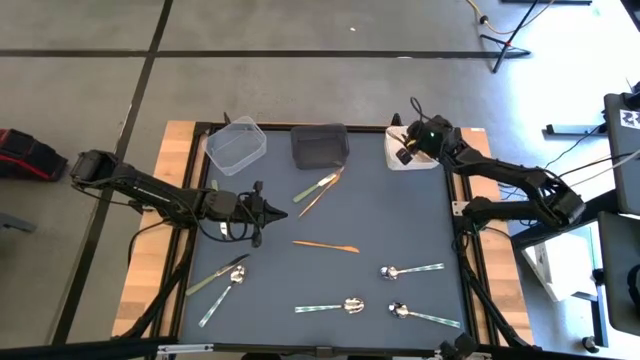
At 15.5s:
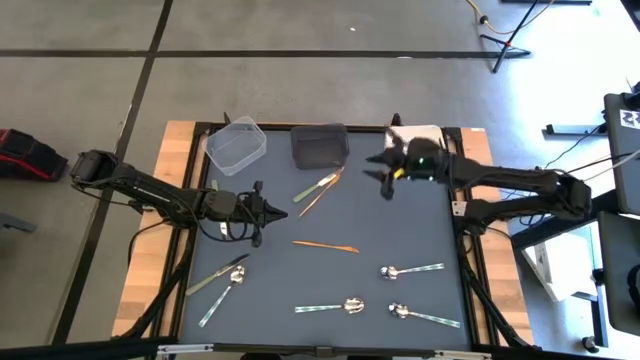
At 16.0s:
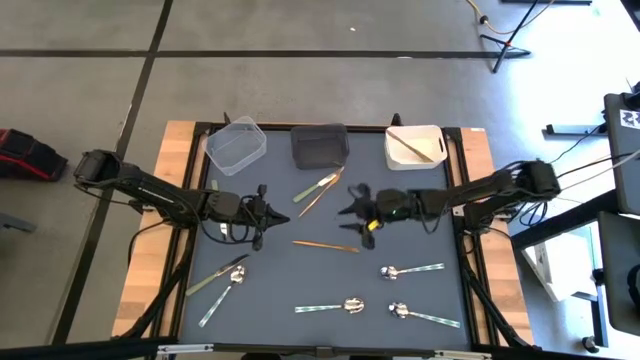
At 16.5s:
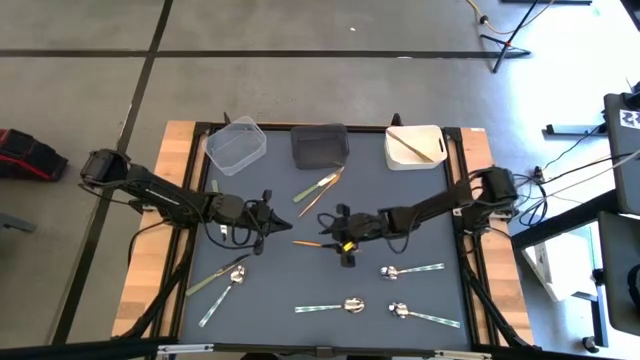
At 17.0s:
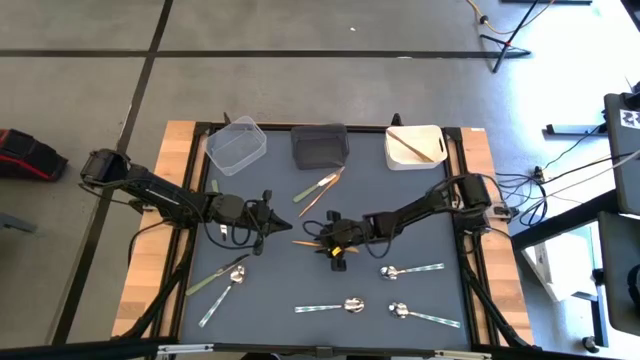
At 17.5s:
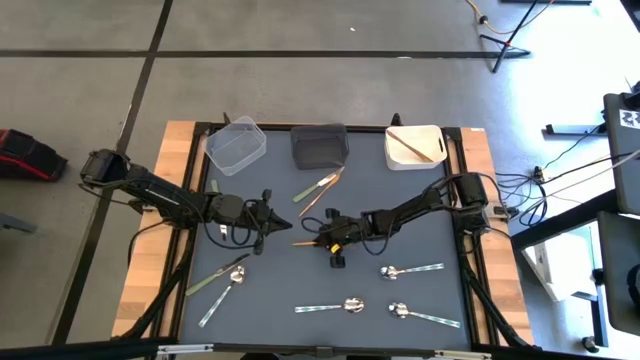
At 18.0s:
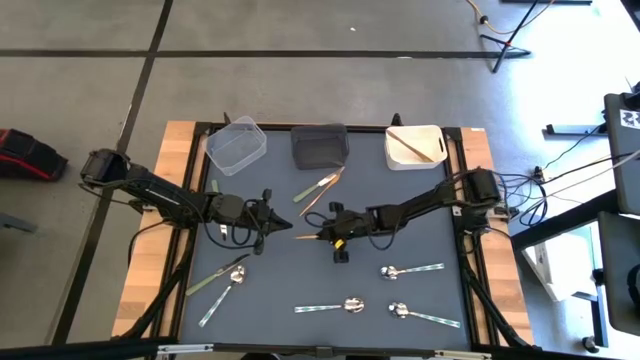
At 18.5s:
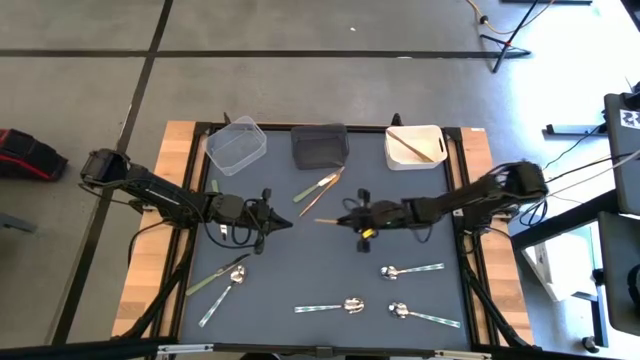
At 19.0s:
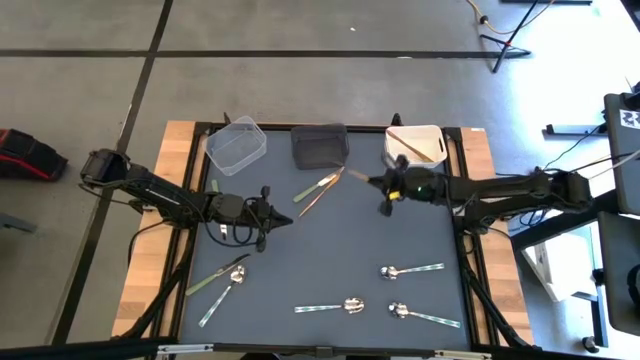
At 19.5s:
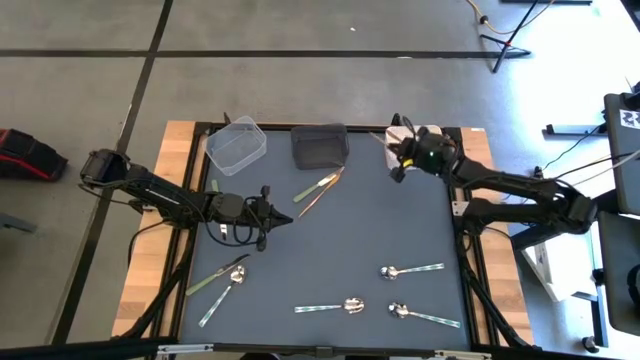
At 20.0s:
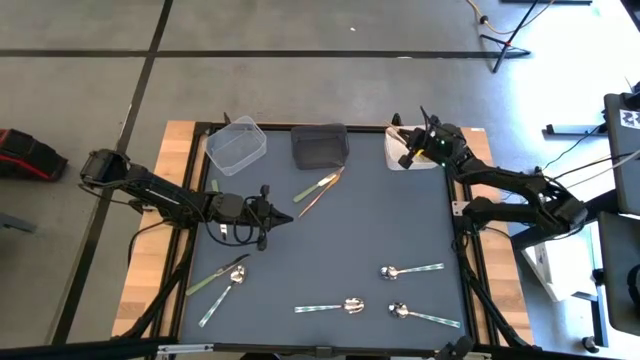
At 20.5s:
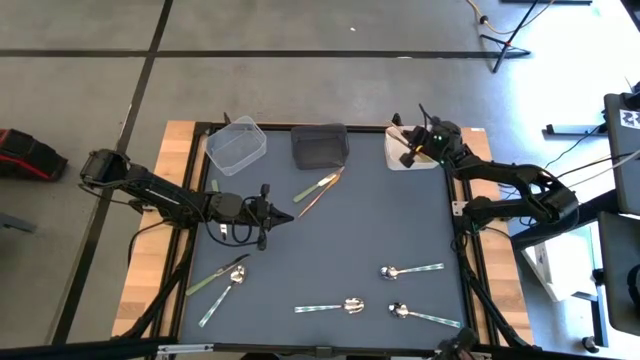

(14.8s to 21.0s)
Task: Sort silverware by color (type)
Put the bottom gold table knife into the white bin

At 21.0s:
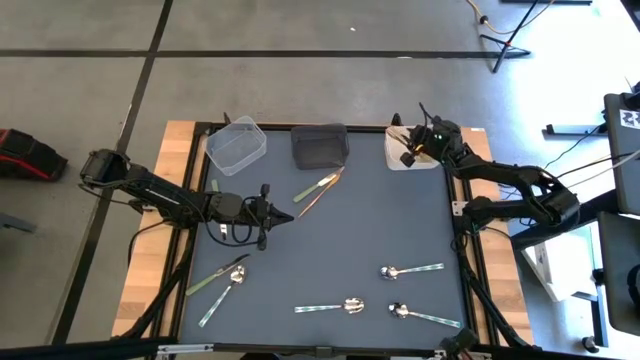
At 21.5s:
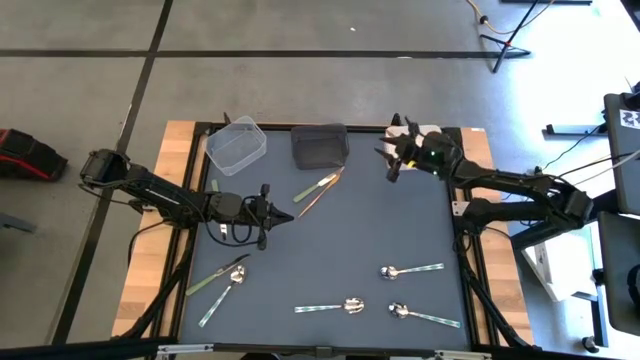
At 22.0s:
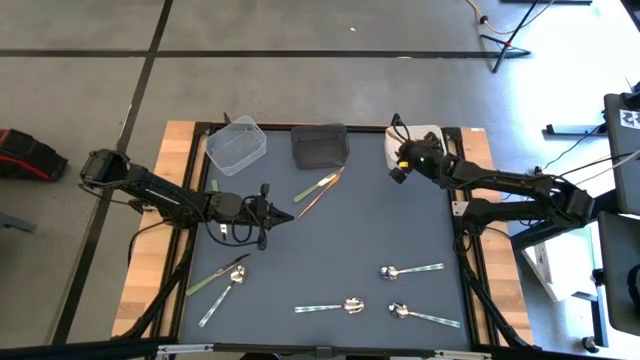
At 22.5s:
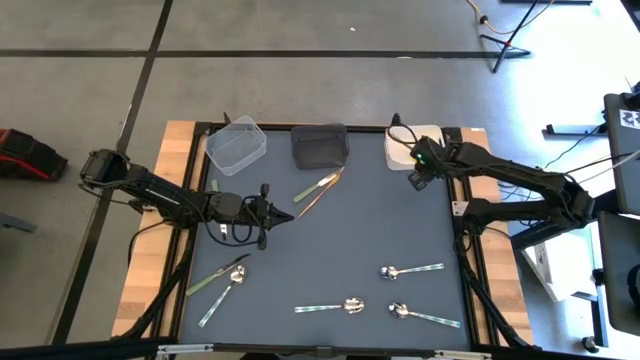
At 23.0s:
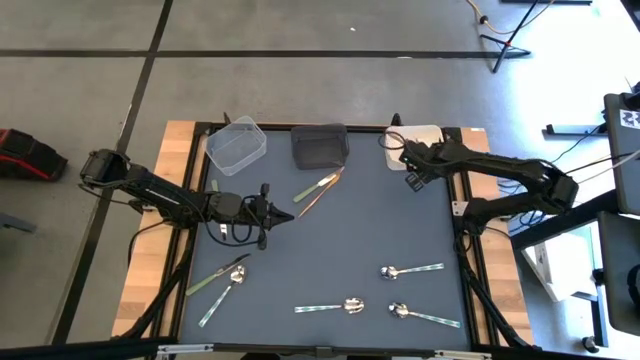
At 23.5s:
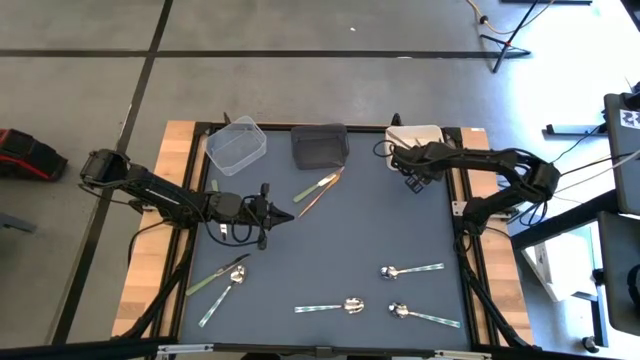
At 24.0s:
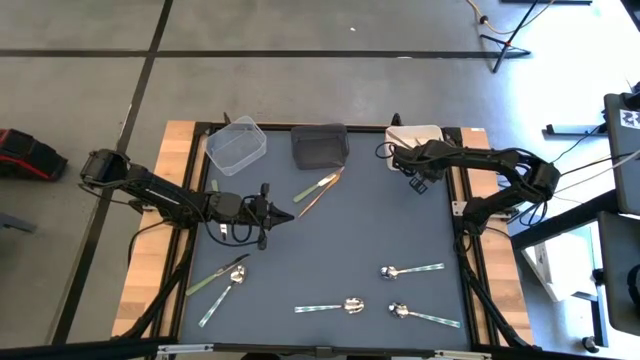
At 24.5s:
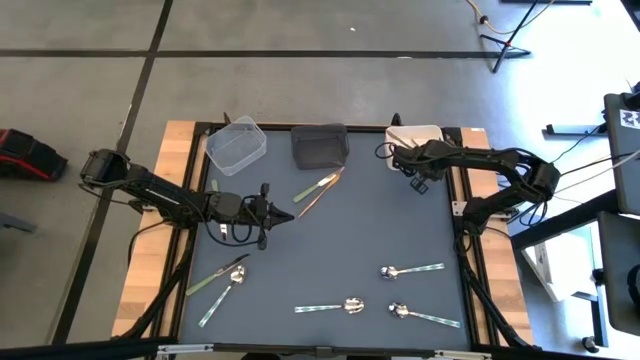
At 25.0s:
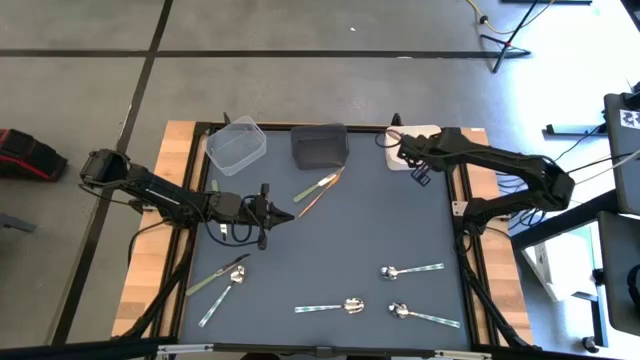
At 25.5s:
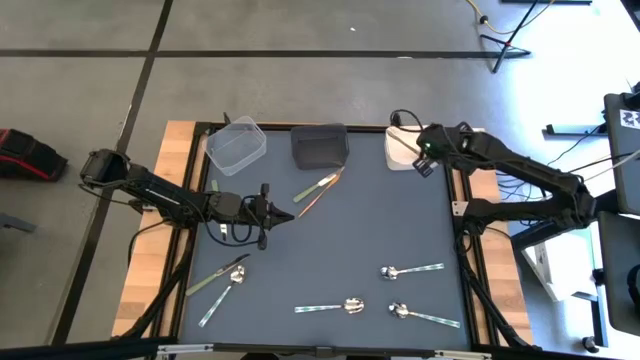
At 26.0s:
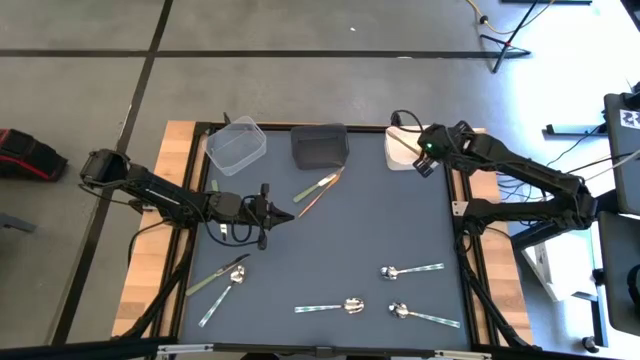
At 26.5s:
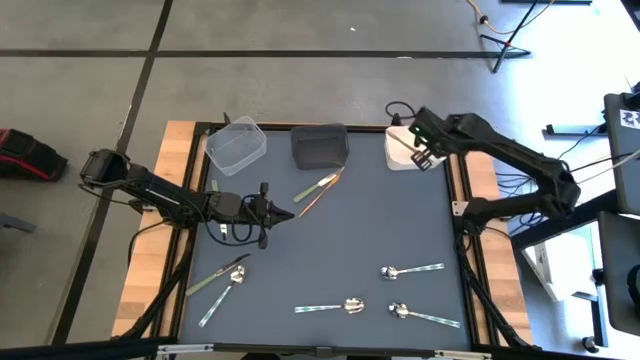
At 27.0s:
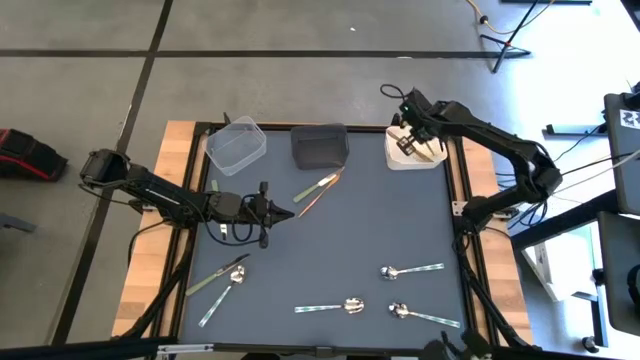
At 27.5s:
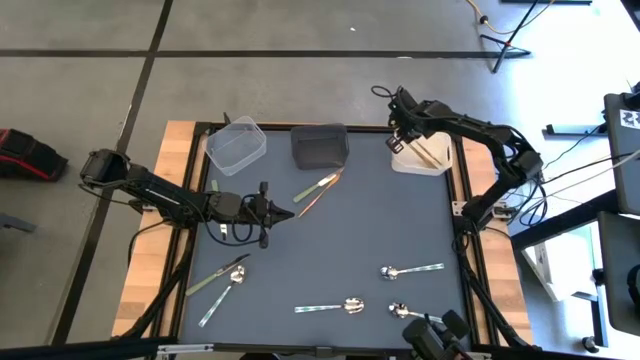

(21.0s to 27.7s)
Put the bottom gold table knife into the white bin

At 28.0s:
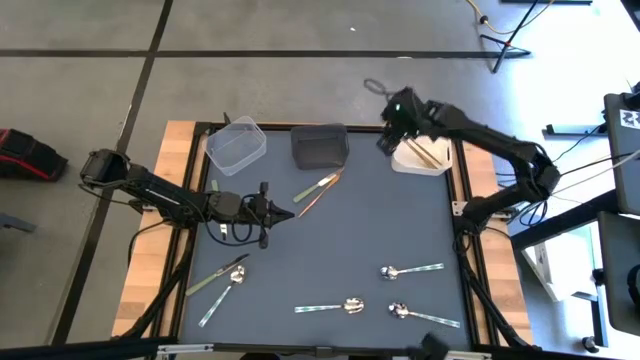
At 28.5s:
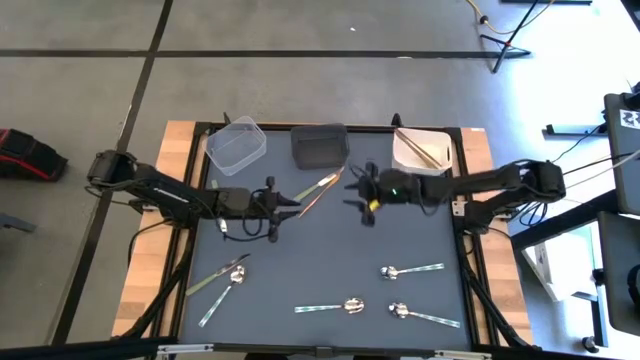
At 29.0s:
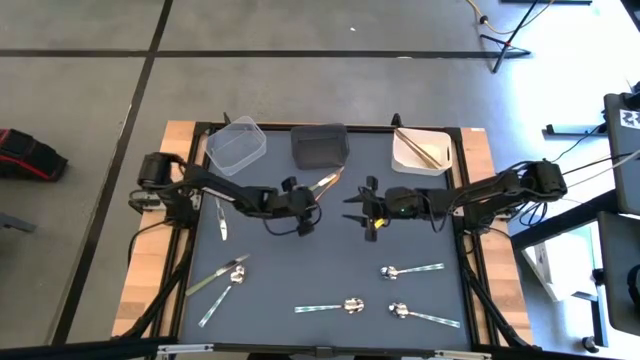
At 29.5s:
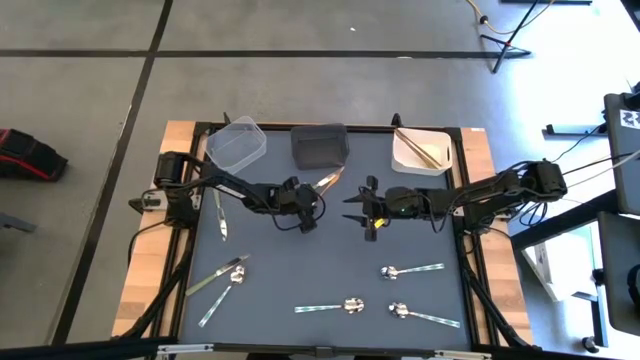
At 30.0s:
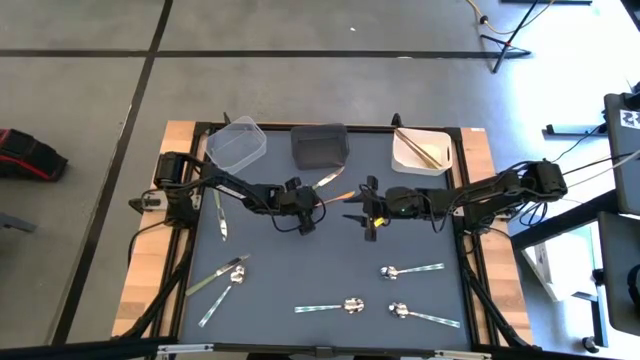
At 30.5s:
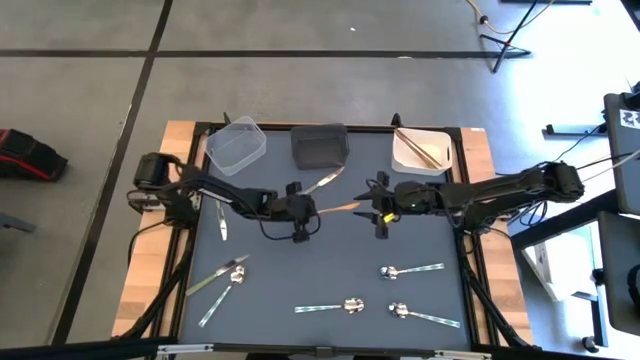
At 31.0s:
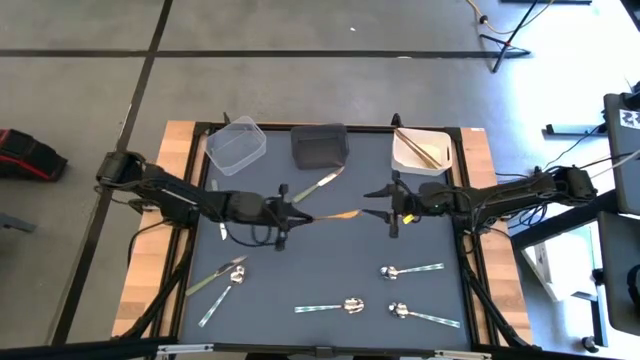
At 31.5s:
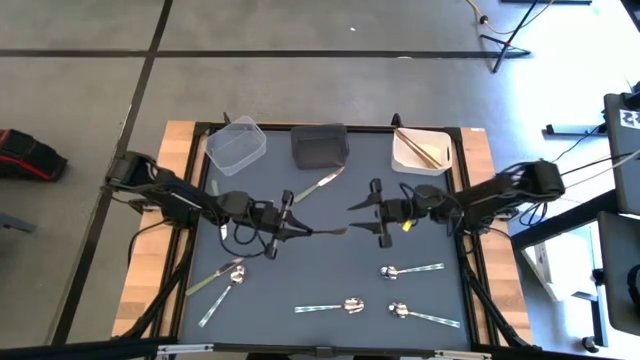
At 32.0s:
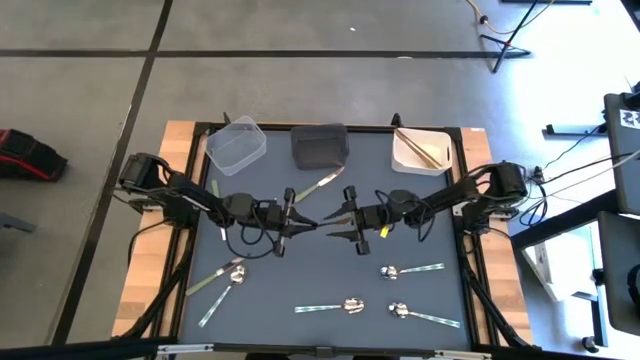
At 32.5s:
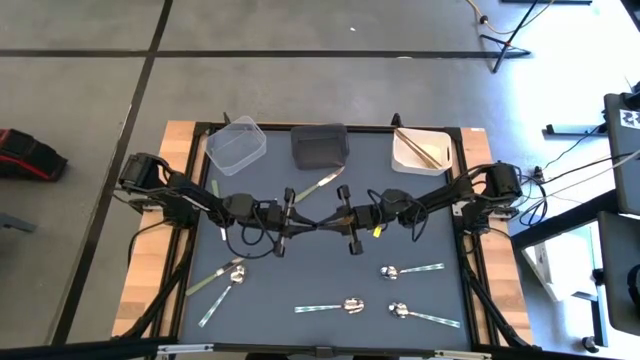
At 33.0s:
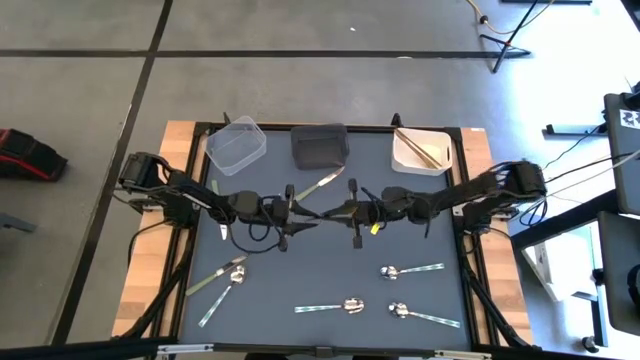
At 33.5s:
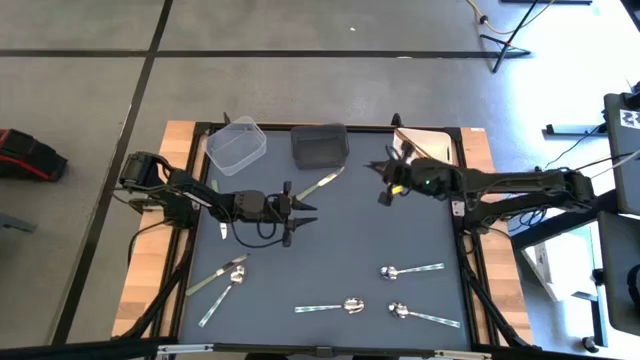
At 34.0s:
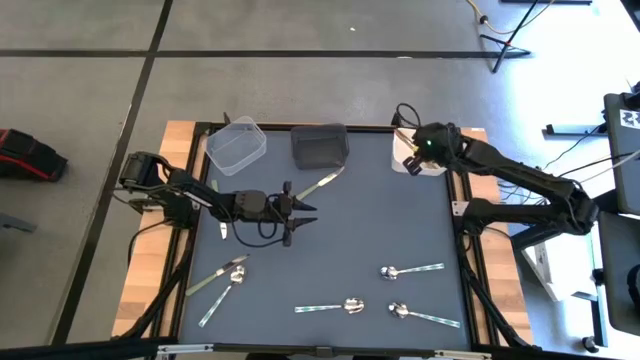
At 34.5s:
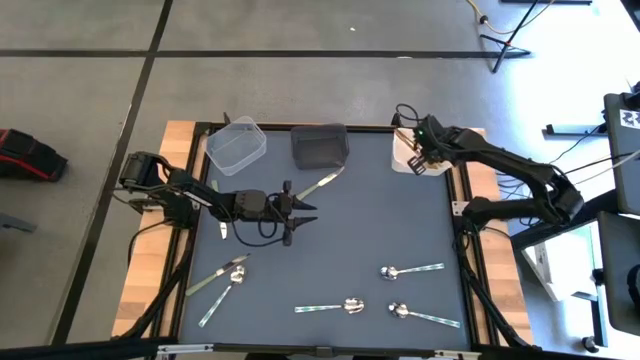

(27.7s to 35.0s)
Put the gold table knife into the white bin

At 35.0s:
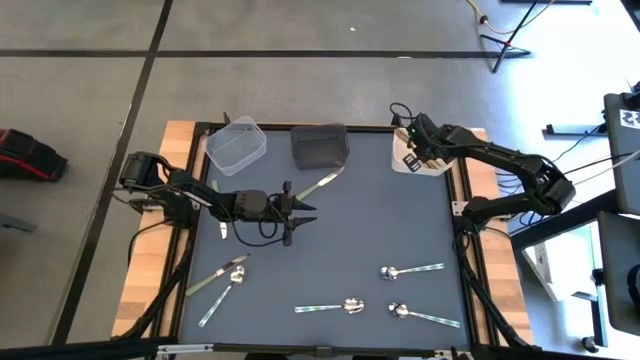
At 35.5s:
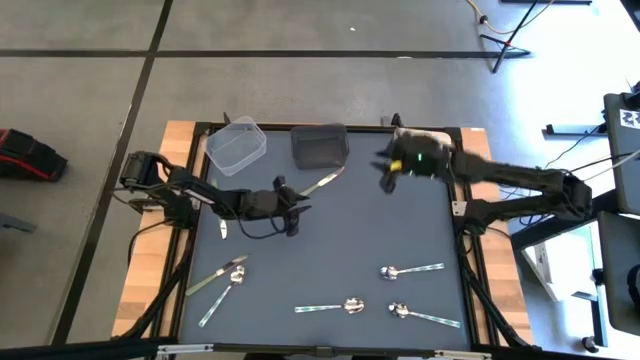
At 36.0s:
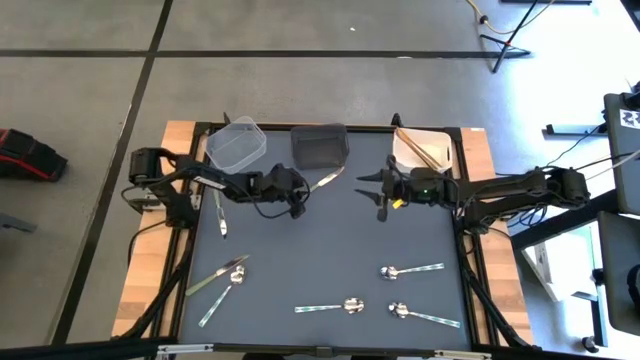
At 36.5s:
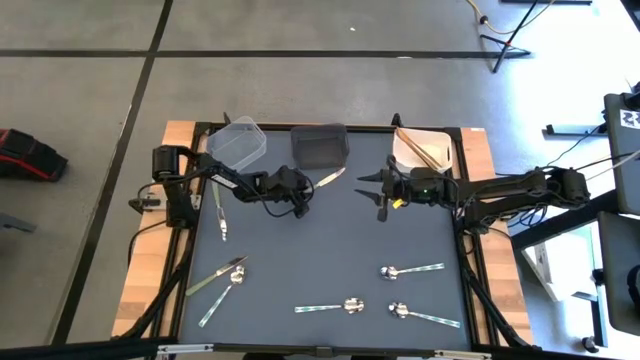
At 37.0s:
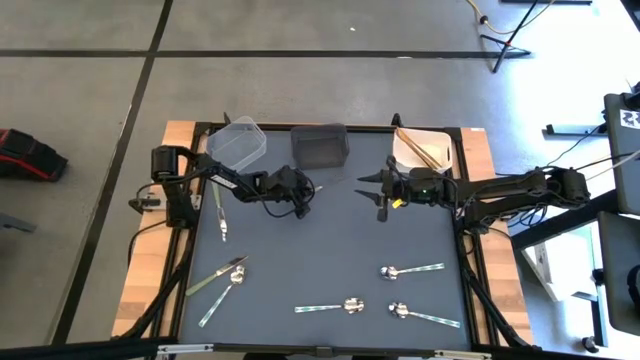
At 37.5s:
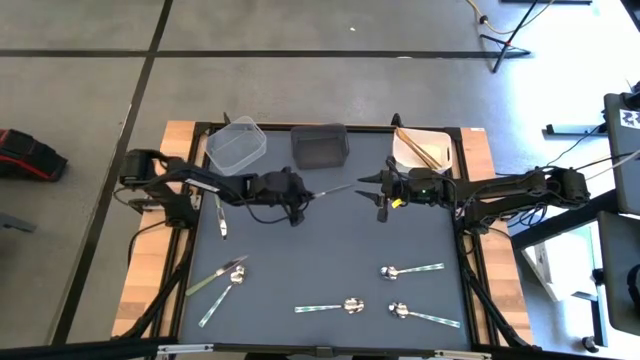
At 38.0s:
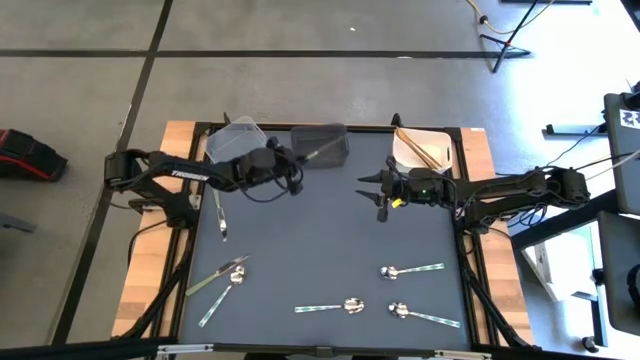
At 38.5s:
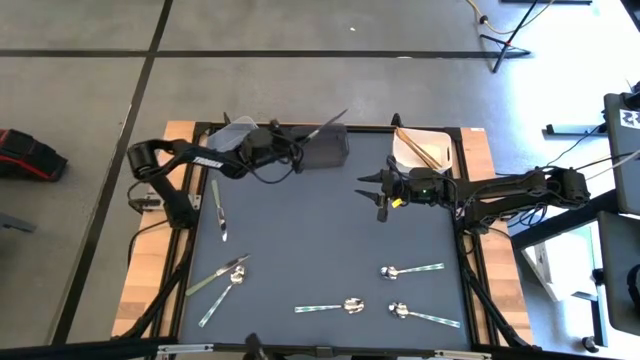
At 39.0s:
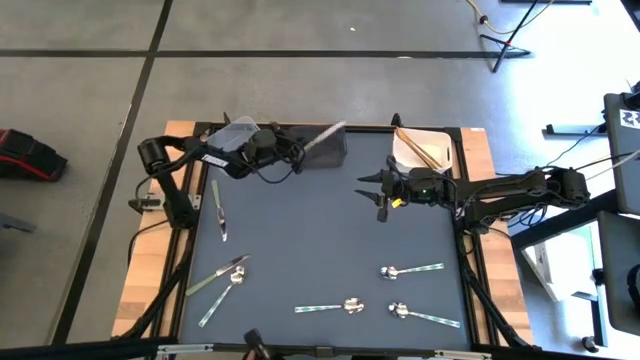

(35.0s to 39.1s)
Put the top right green table knife into the black bin
